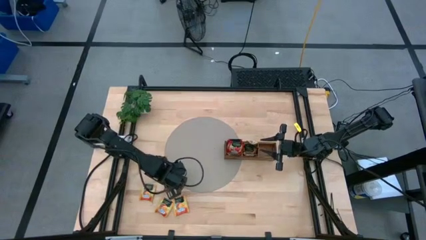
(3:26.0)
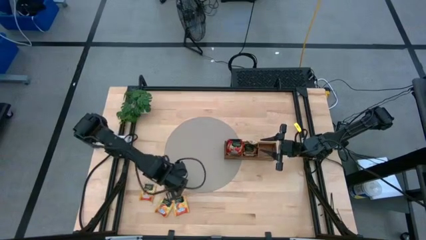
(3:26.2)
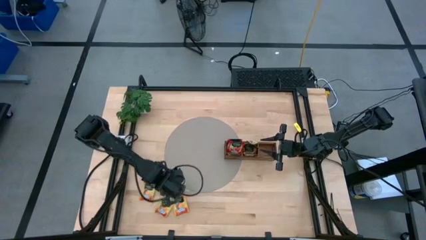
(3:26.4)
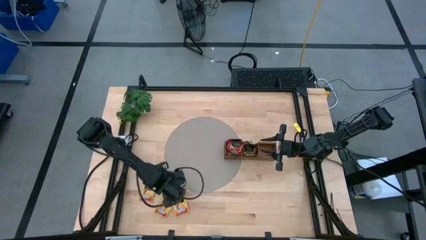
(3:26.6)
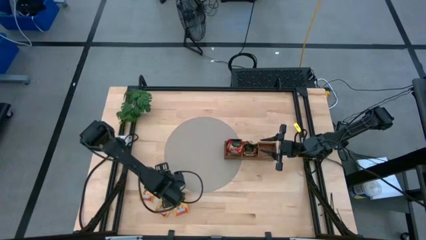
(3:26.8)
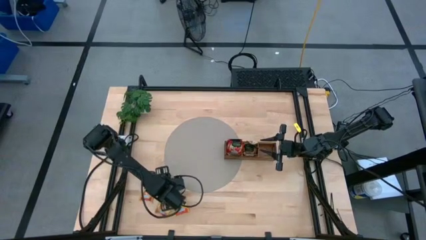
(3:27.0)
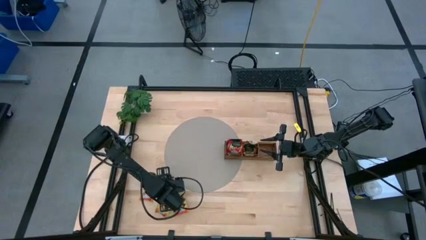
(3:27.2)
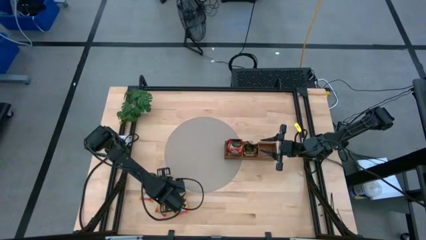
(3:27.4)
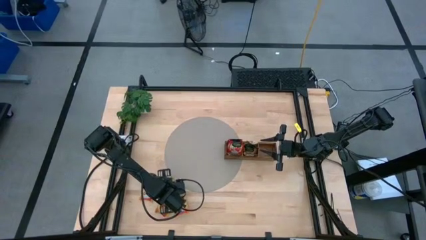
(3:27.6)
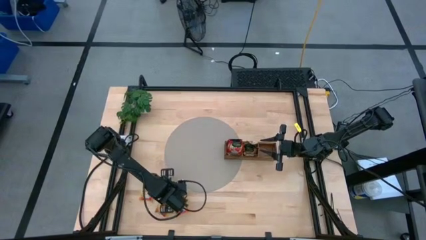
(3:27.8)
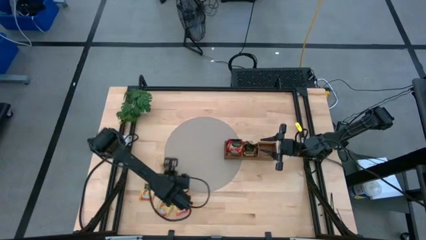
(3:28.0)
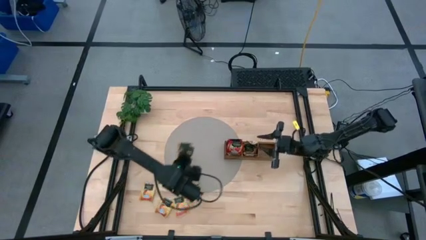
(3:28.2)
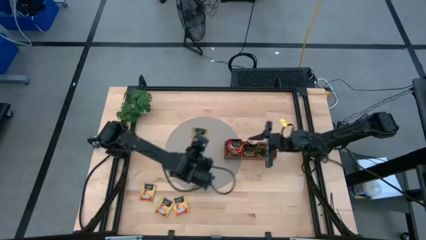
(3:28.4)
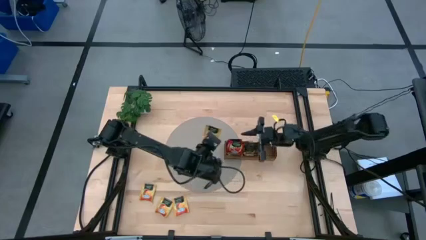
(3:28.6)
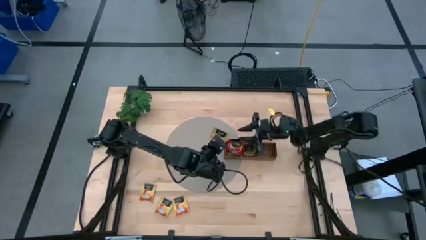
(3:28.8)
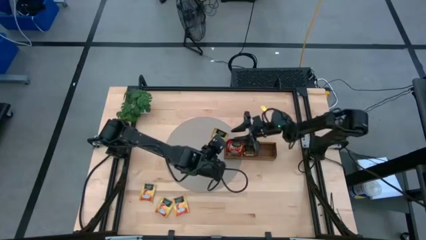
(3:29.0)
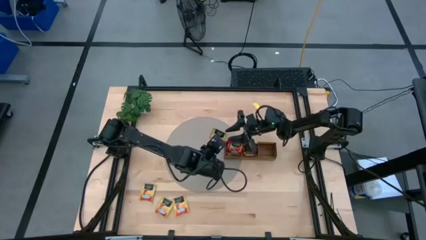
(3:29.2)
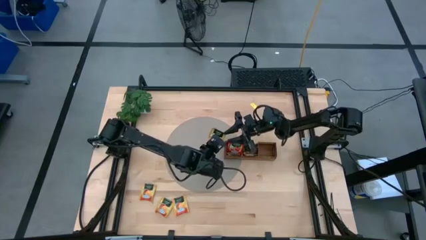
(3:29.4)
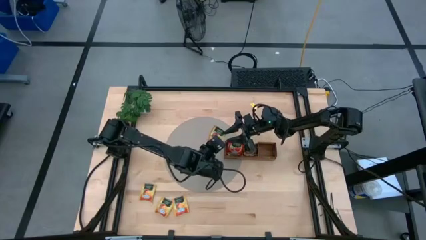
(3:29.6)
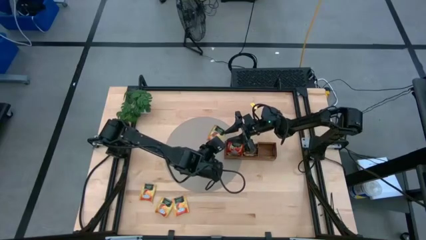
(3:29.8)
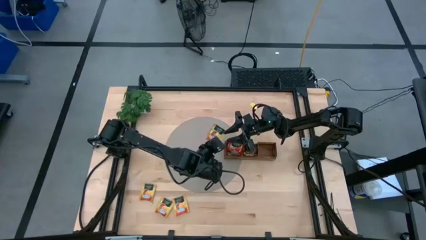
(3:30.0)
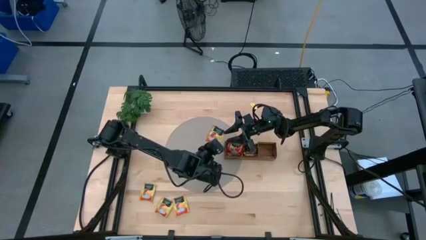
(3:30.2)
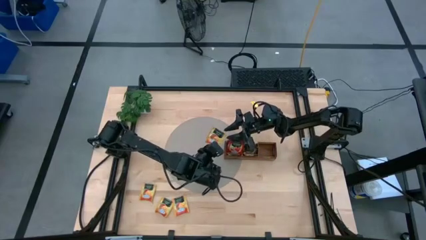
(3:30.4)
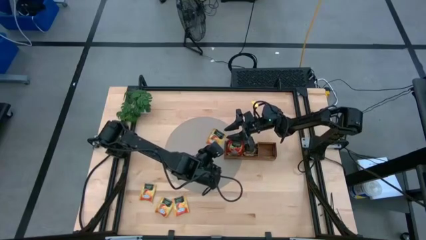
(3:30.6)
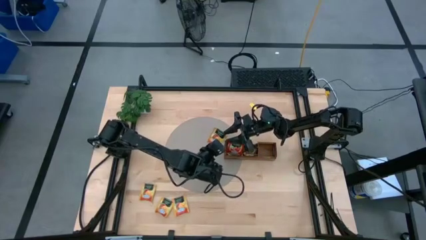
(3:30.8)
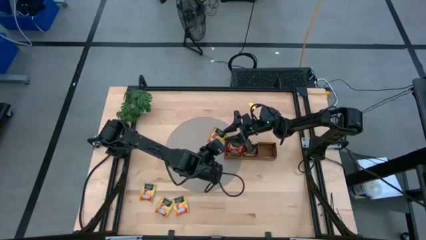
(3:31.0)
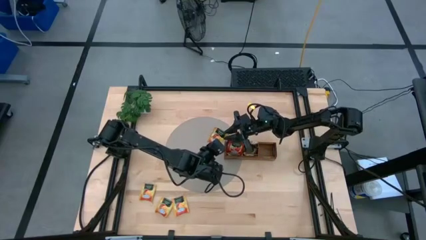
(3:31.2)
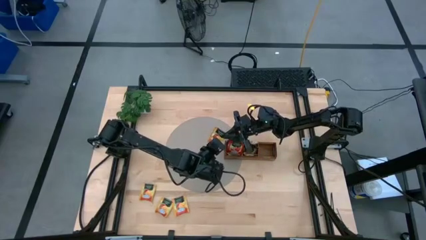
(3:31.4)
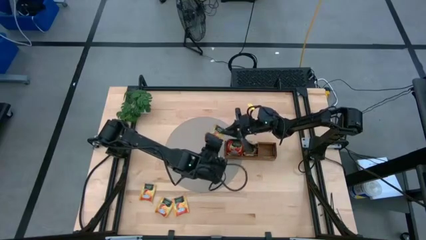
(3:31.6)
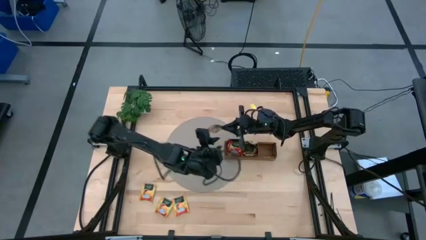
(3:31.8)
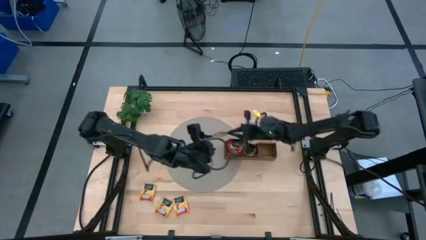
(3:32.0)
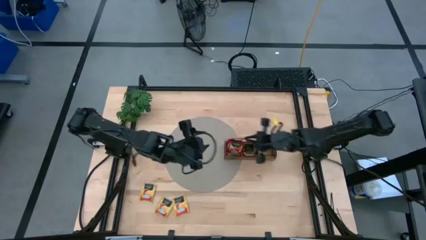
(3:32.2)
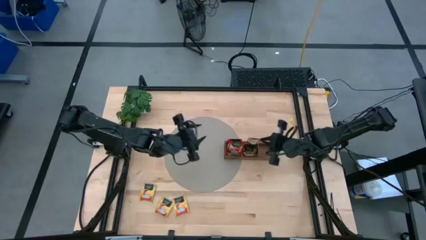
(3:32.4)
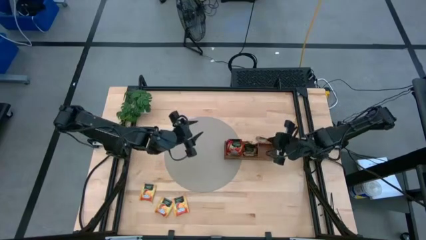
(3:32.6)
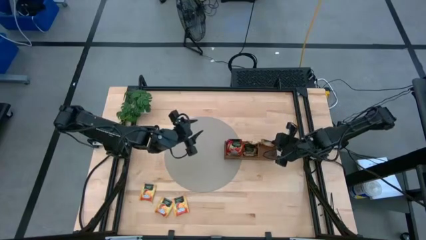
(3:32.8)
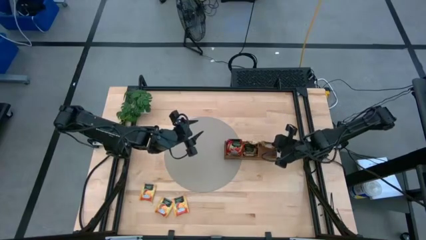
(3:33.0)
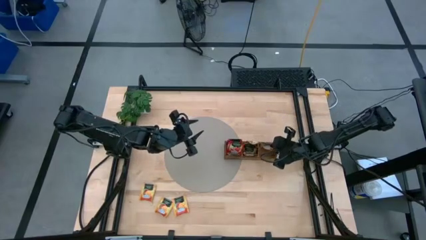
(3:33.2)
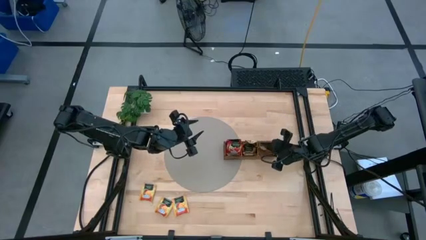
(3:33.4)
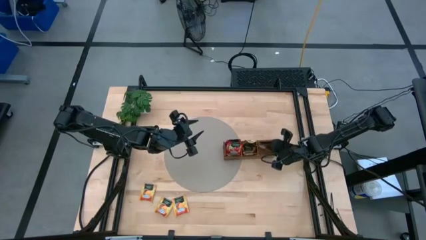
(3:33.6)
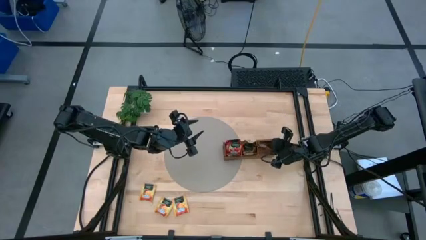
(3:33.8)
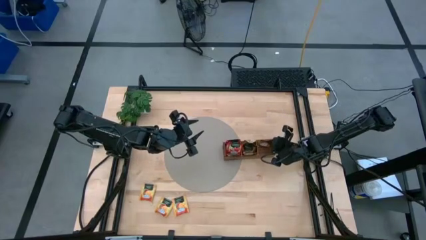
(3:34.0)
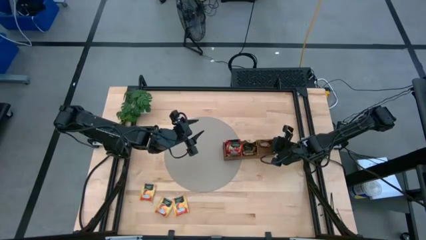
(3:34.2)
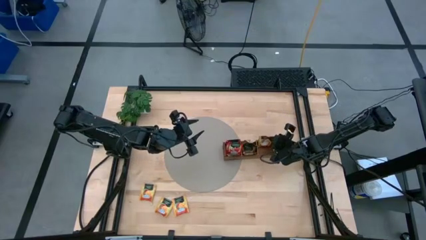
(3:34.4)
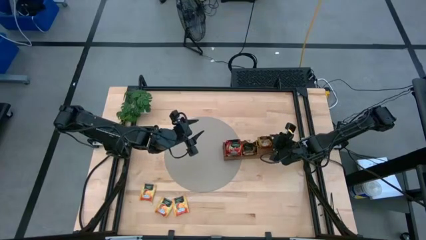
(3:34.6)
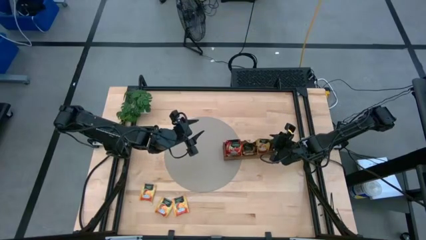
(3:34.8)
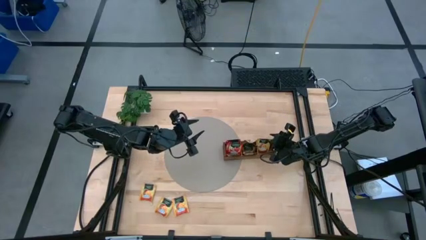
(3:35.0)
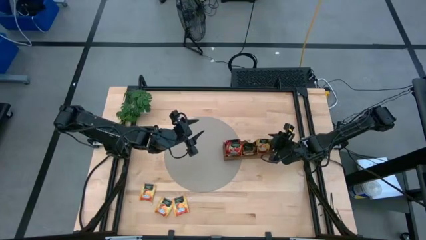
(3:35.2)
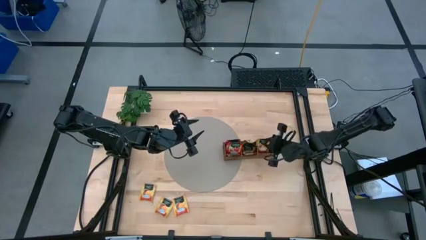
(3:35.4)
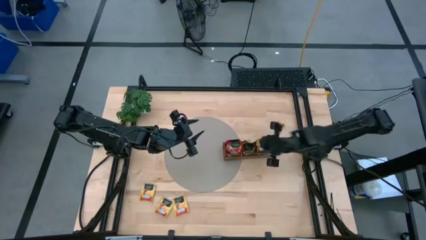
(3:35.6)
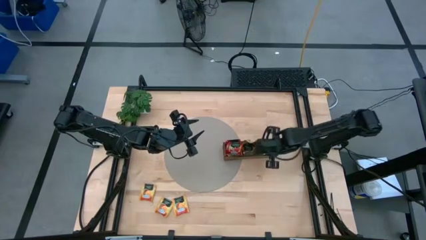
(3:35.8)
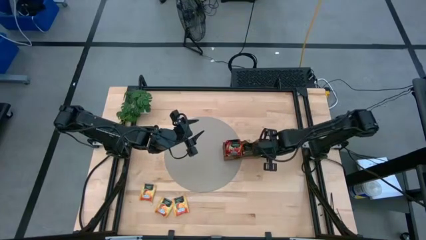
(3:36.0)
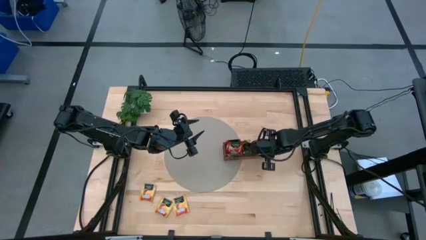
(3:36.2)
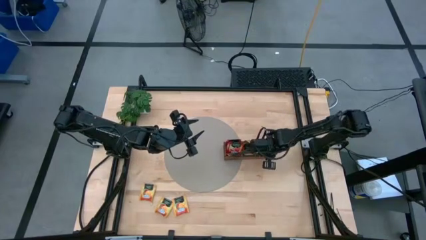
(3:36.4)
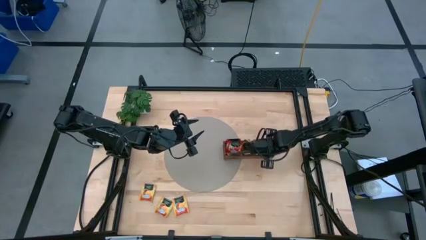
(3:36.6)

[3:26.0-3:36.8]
Task: Pick & Place Tea
Put the yellow tea bag into the right section of the wooden organizer

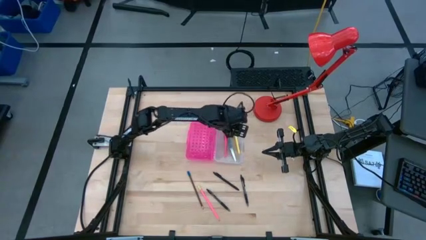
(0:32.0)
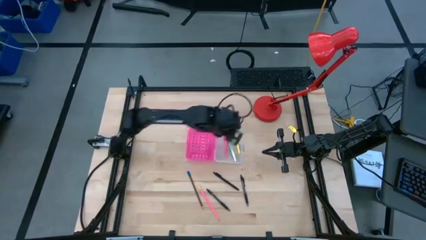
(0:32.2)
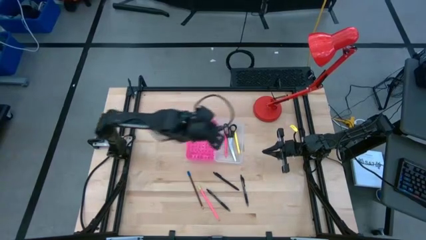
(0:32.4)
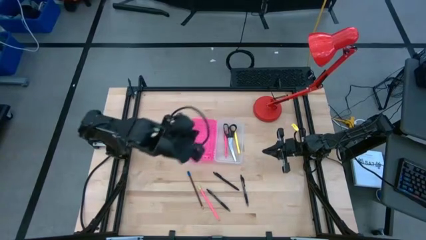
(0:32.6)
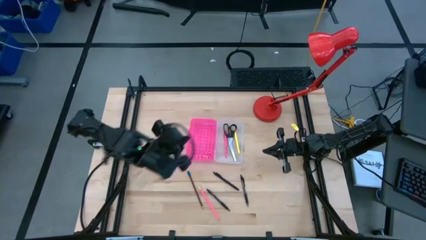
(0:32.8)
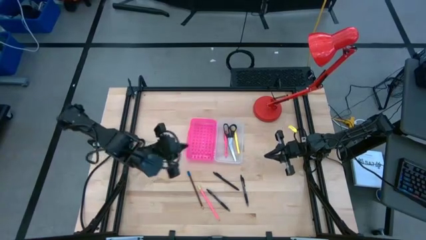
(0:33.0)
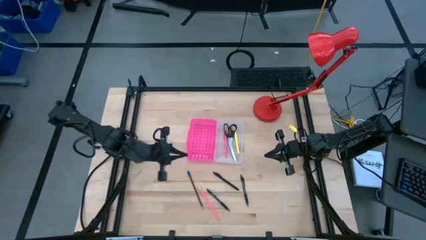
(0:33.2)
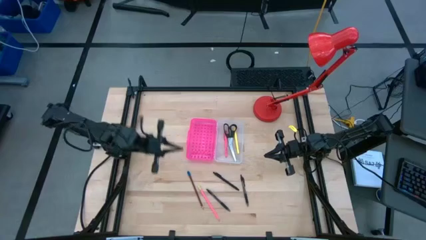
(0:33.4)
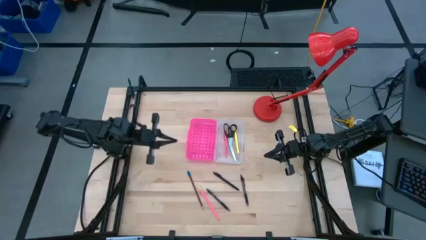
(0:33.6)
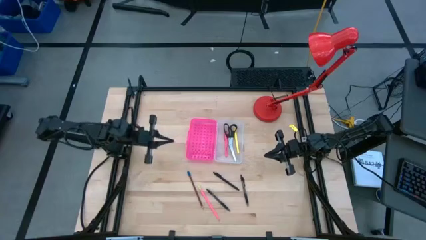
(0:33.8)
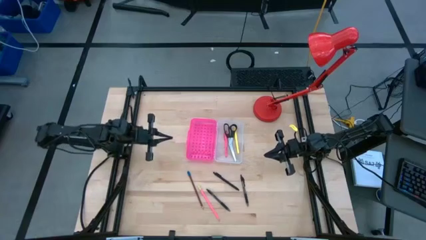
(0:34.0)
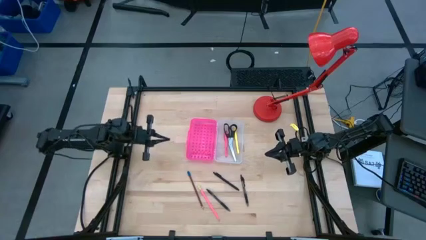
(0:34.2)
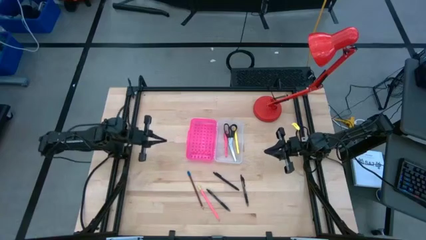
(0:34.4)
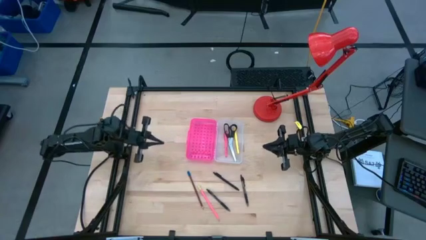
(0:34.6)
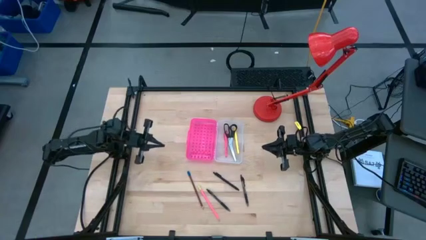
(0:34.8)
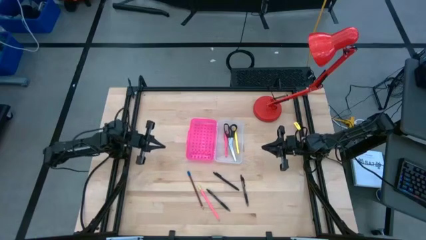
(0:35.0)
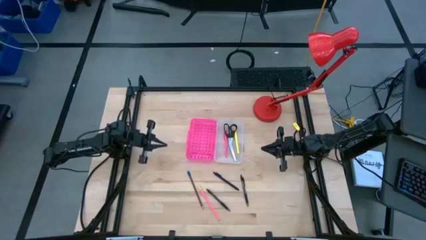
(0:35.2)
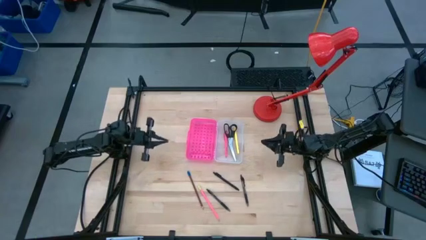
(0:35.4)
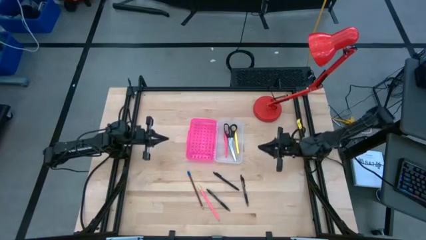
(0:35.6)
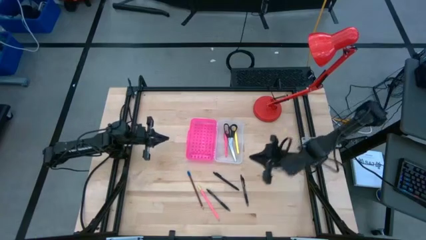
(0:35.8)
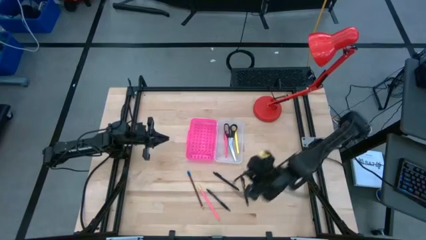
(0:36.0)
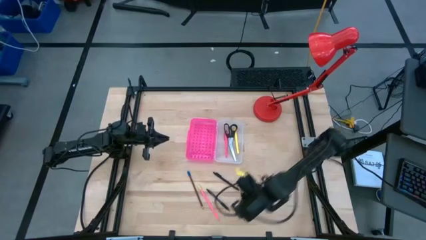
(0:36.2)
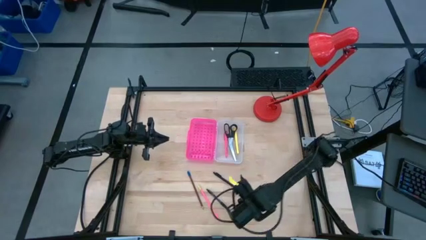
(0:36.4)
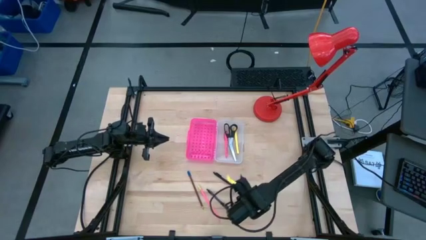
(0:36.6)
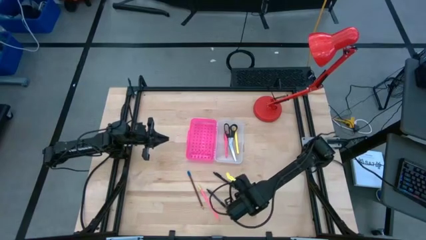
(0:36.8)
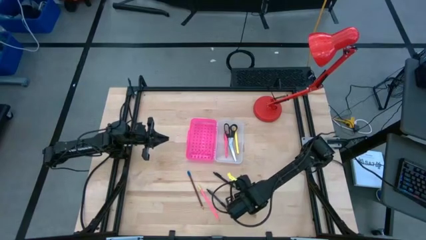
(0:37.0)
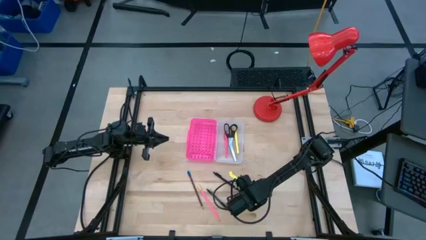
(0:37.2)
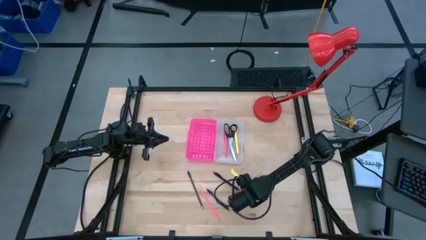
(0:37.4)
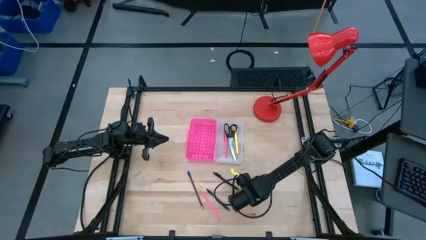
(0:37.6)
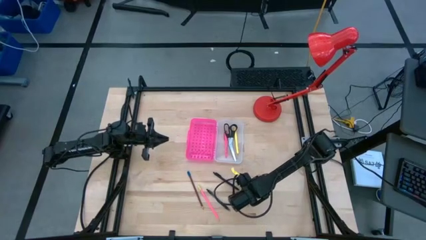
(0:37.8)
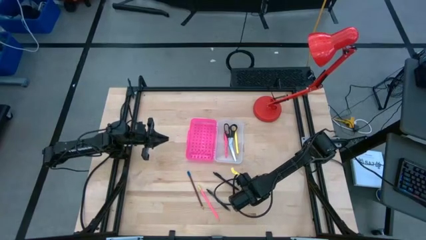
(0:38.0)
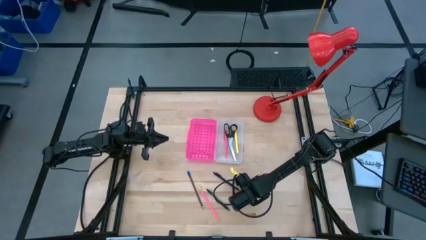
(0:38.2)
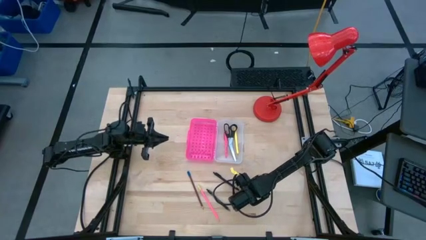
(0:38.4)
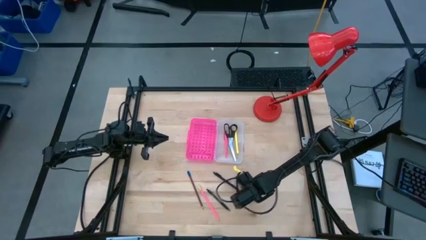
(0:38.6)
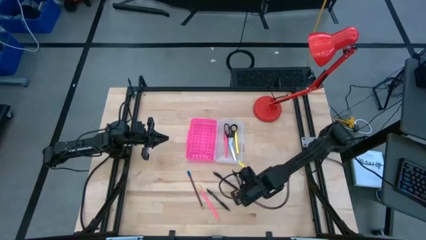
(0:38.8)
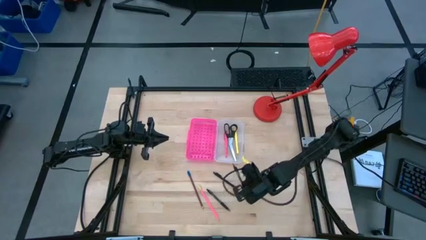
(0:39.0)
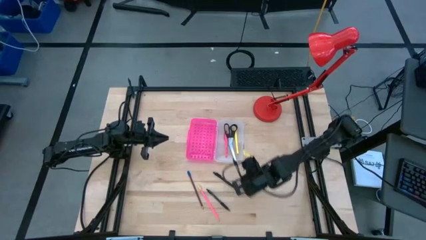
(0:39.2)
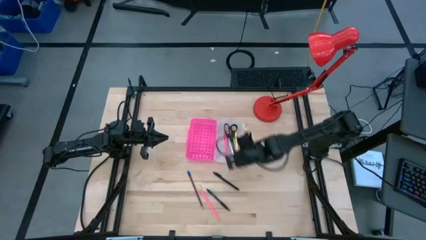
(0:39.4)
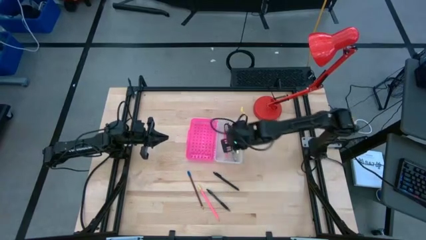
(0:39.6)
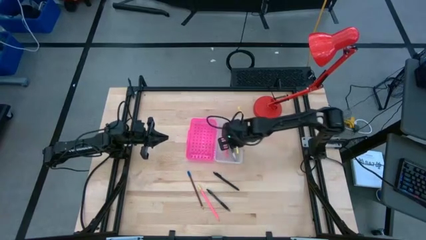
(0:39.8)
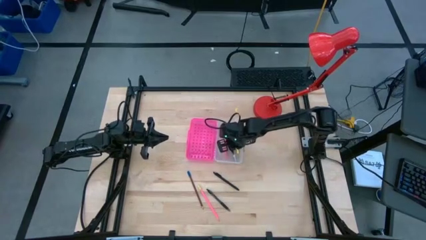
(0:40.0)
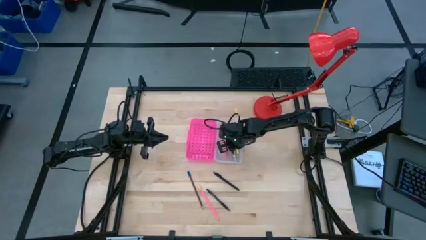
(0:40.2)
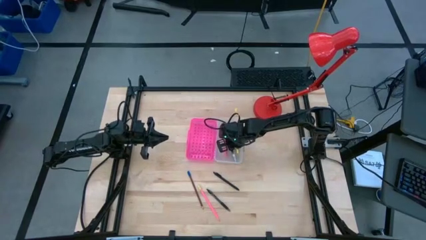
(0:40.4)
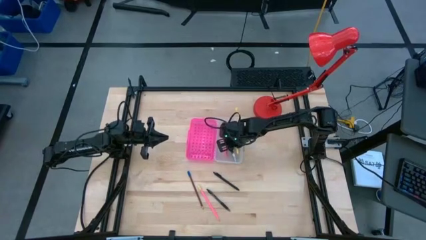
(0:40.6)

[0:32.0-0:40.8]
Task: Pick & place school supplies into a supply box
Put the right black pen into the supply box
